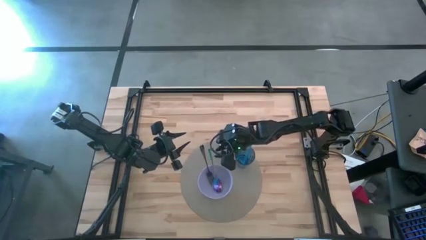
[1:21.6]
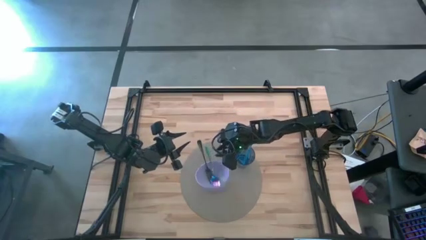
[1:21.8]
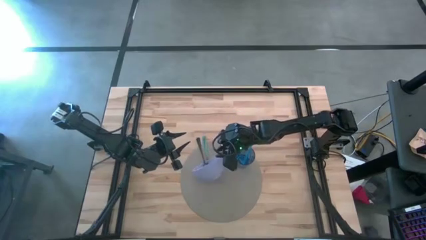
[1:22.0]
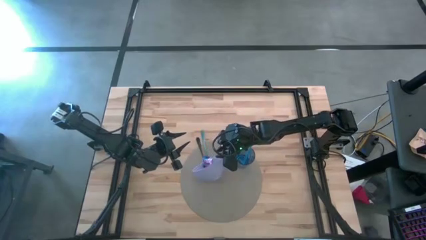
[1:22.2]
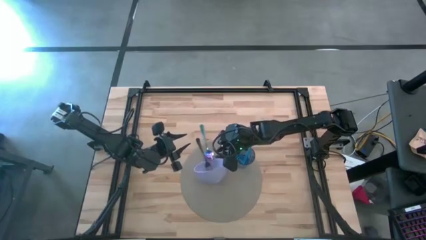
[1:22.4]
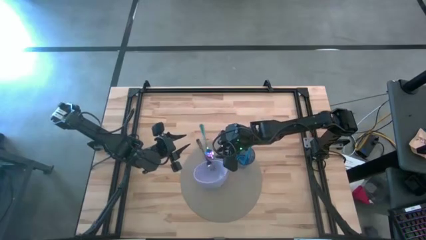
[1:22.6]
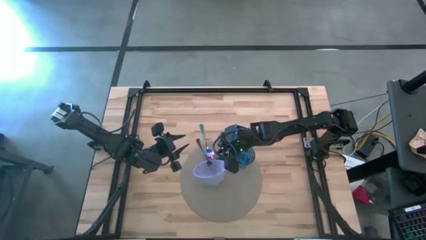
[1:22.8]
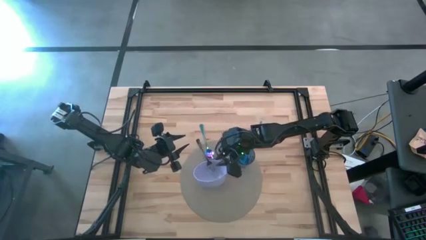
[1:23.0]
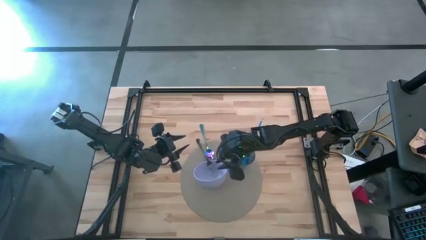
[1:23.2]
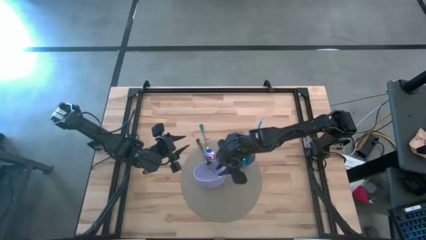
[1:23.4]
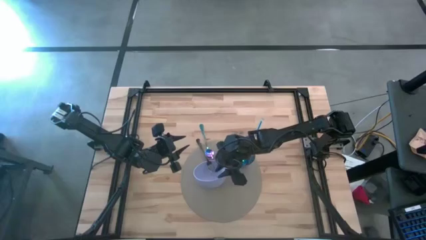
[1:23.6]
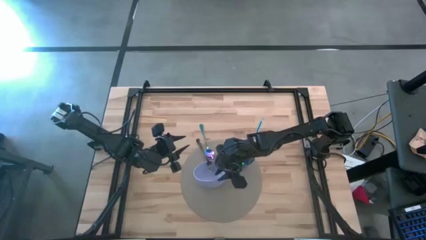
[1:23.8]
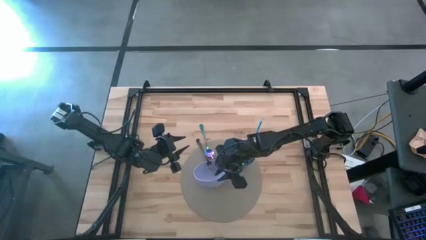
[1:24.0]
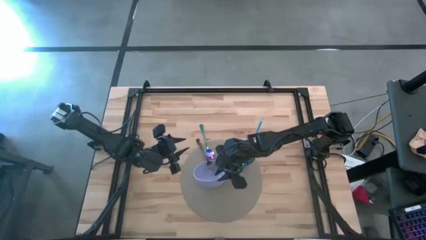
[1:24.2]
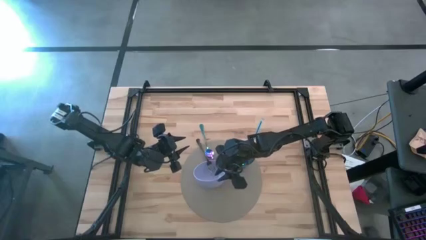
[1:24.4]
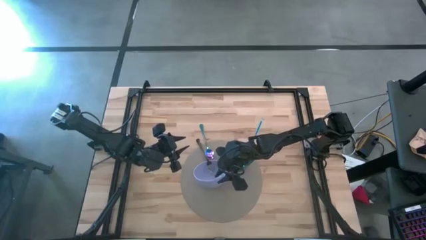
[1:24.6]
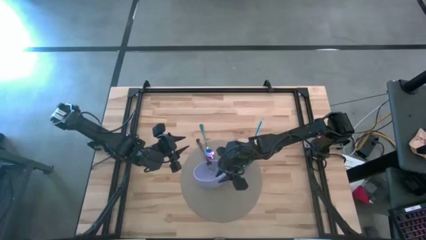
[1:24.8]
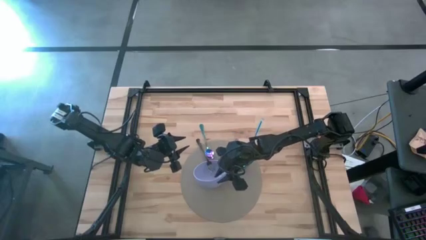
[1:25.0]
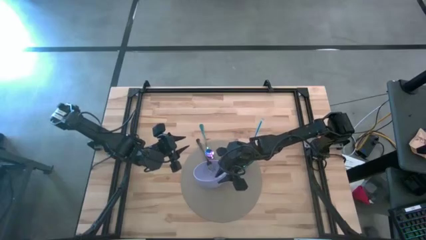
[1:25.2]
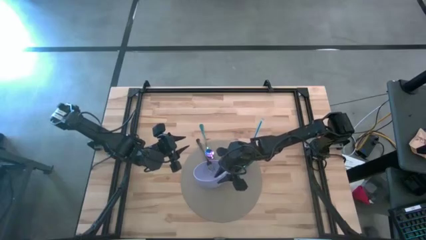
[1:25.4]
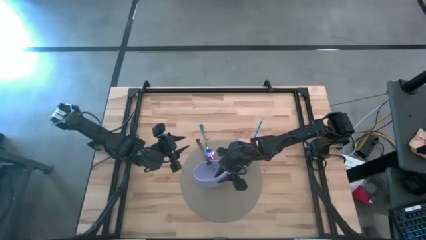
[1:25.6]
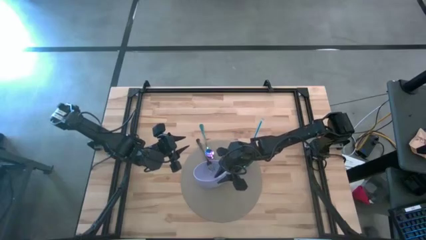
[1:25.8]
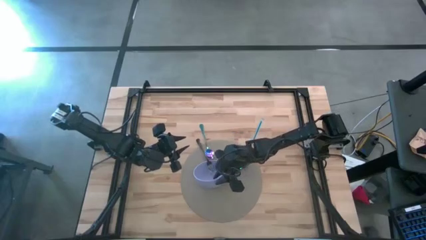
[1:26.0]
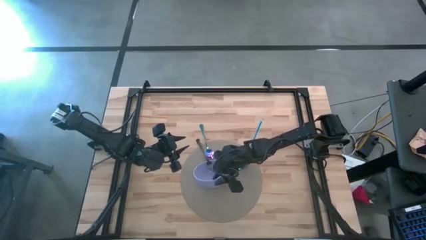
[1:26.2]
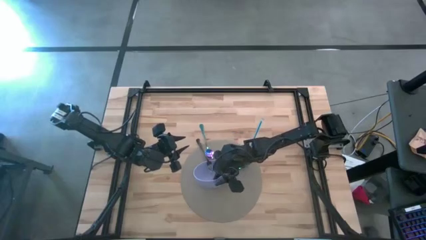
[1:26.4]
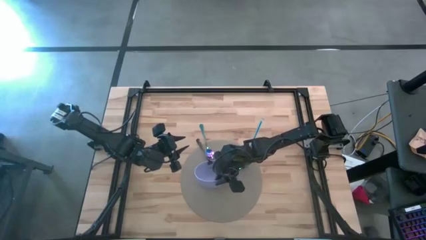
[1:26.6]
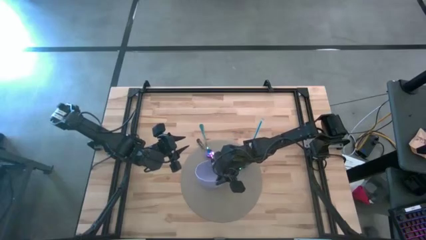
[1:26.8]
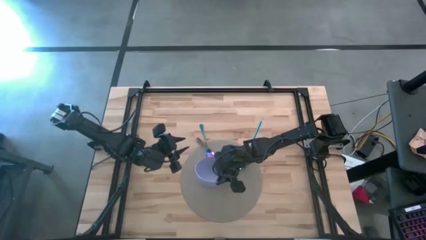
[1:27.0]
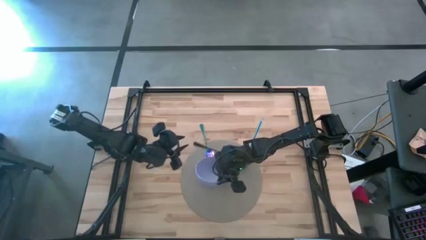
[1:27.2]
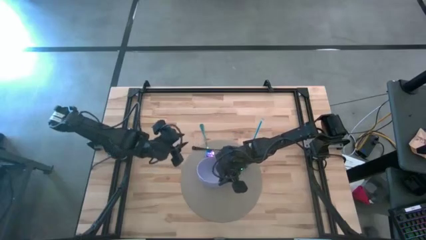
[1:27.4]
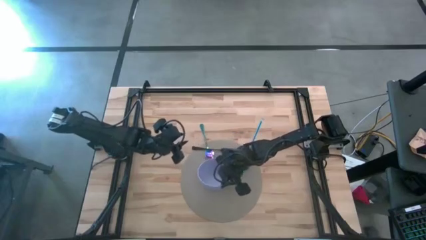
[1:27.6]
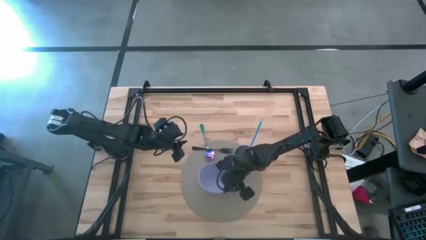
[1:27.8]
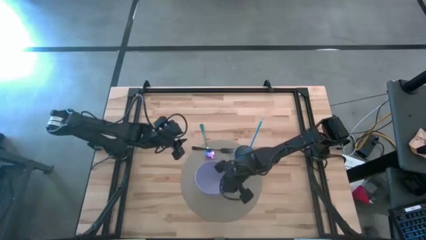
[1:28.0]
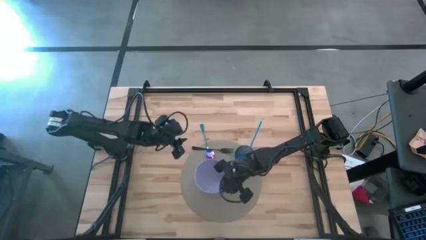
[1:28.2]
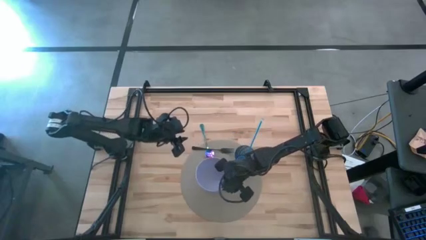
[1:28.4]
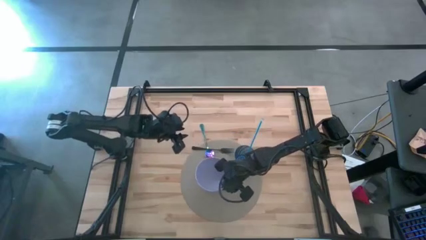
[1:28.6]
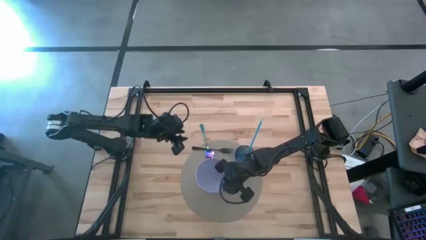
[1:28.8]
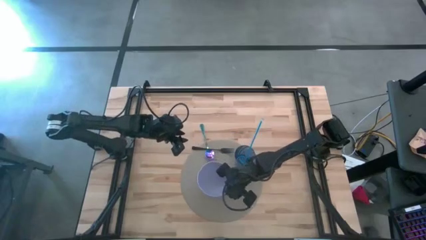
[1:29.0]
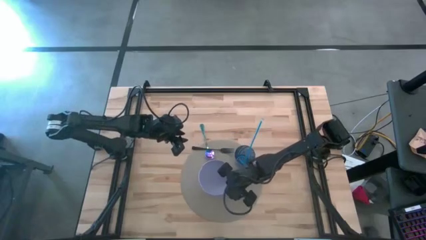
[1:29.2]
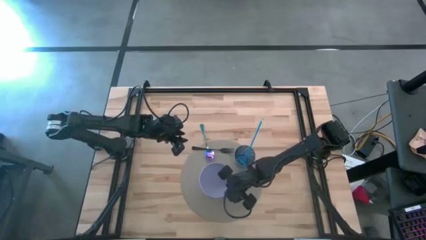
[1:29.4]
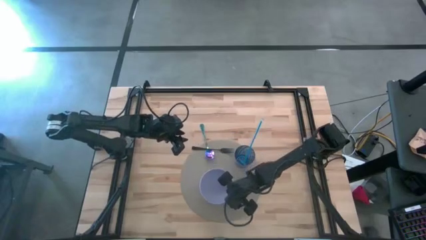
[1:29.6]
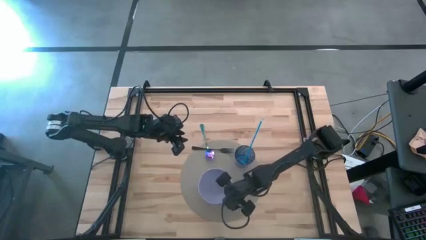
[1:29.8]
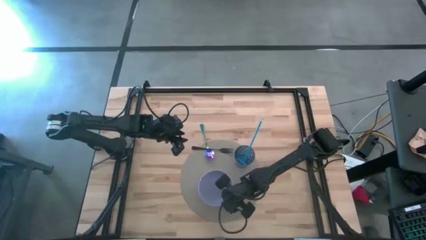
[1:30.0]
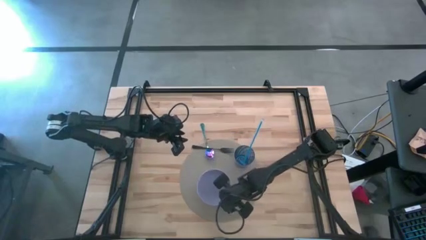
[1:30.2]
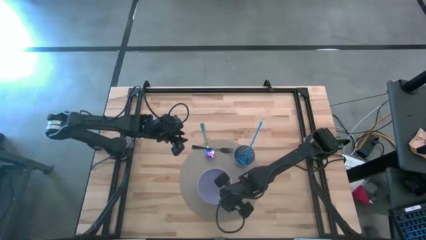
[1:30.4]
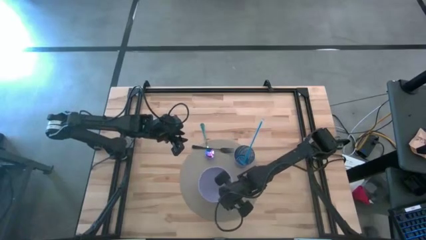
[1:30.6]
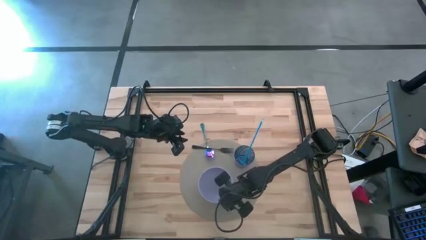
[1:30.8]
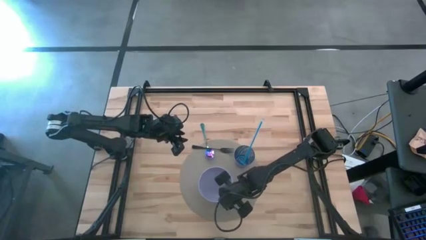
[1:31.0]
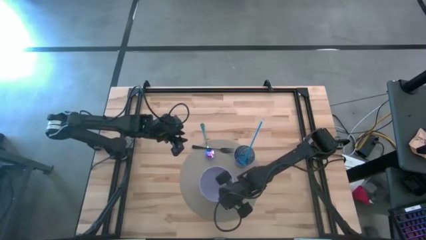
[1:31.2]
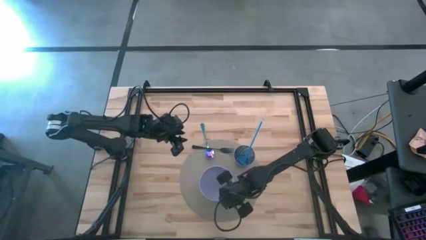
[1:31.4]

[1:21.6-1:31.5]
Task: Pick & Place Utensil
Adjust the bowl on the mat

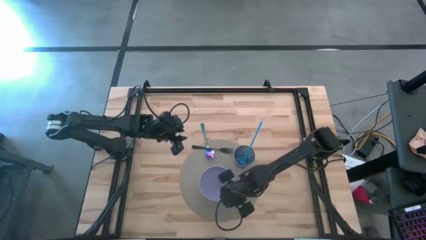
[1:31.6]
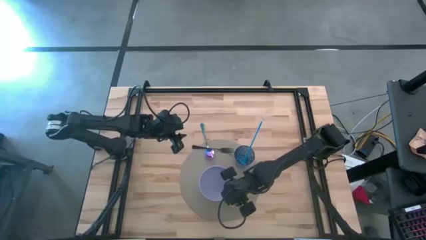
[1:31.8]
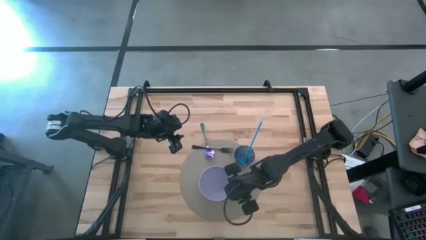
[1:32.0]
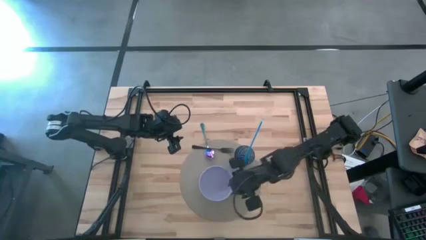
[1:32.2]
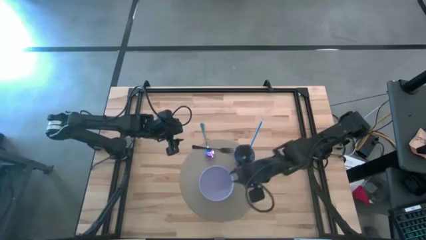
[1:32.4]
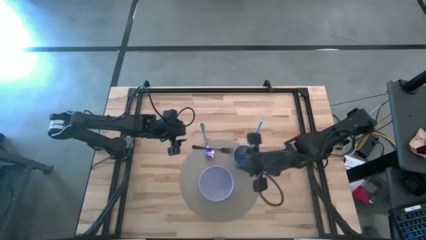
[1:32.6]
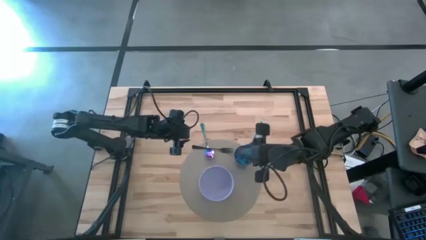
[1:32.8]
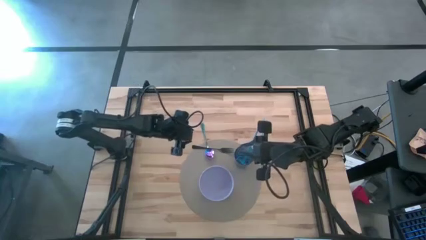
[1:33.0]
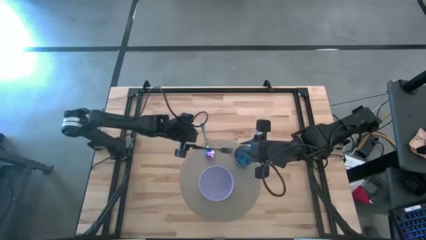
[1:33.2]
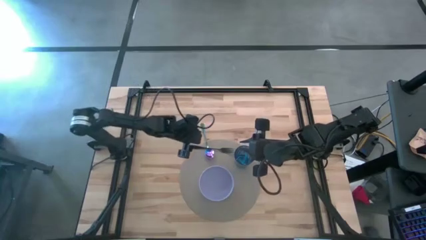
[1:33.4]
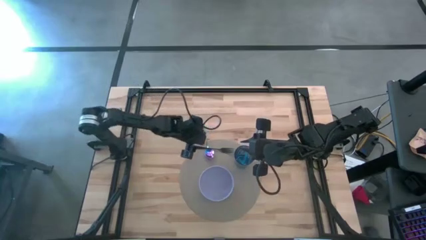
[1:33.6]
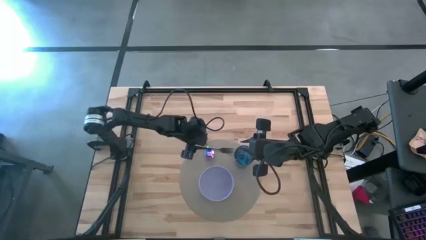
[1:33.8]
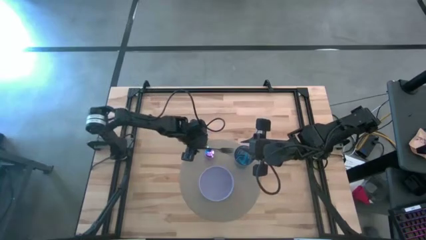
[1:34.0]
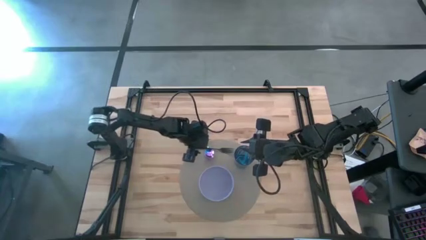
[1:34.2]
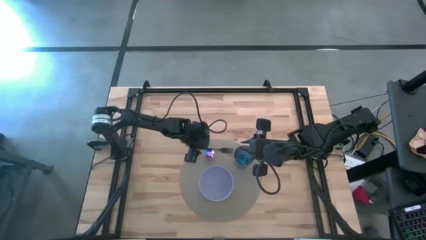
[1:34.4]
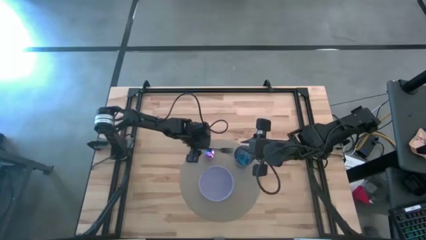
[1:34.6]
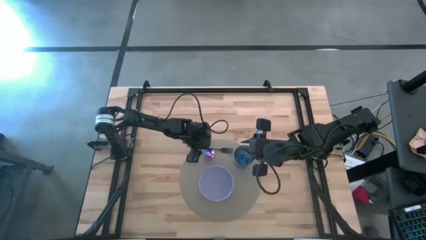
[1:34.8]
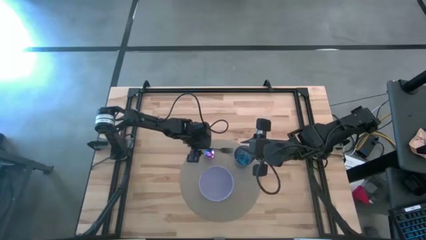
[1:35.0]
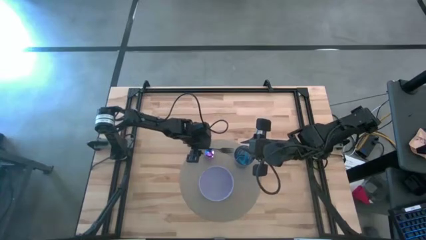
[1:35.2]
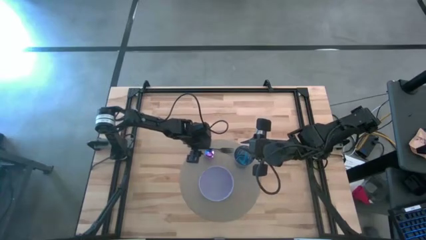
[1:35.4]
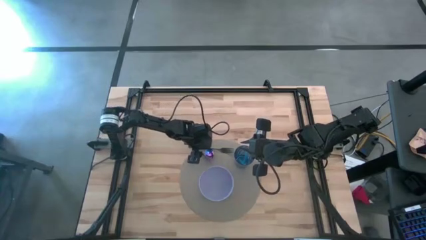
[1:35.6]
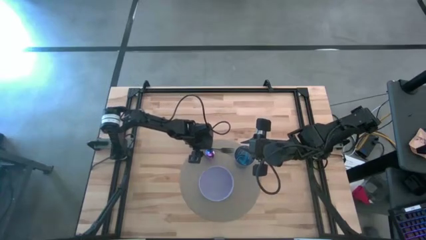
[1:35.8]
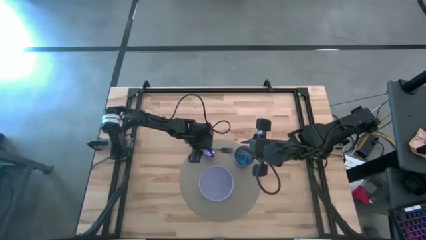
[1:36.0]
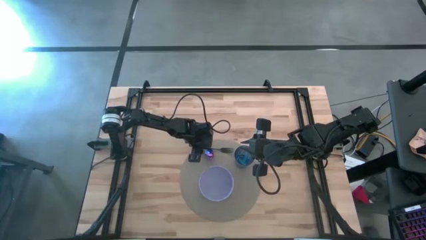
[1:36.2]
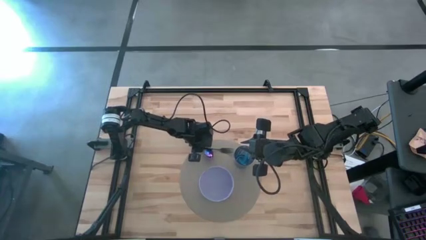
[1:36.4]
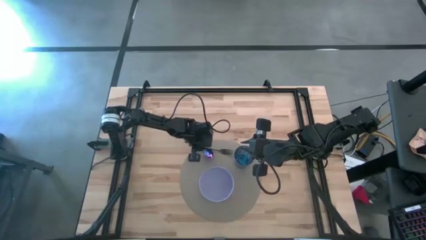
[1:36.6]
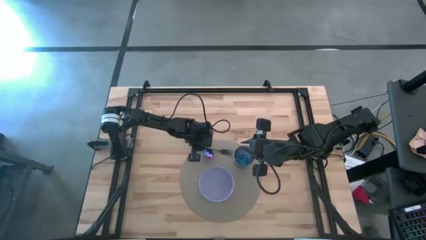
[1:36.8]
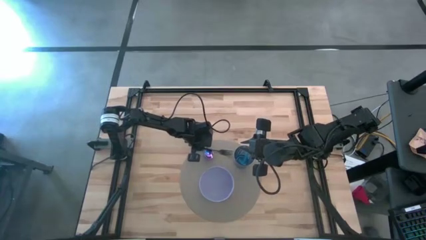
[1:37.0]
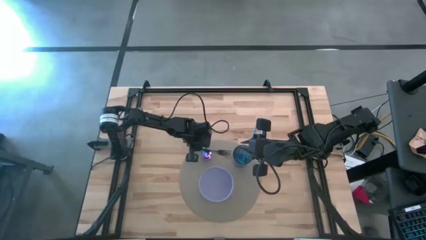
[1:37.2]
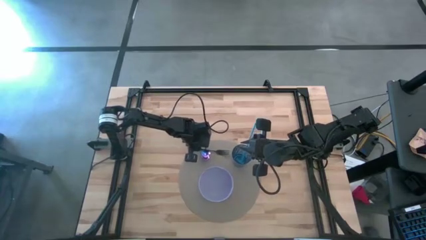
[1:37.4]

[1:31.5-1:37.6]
Put the fork into the bowl
